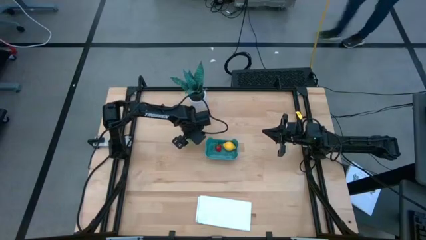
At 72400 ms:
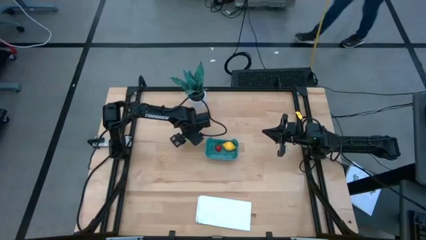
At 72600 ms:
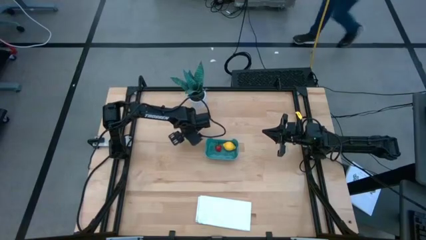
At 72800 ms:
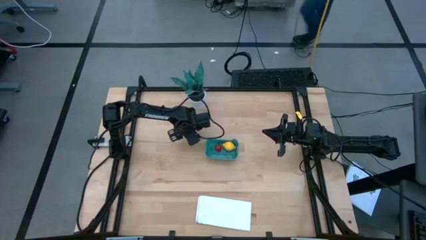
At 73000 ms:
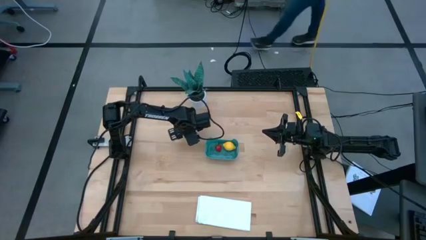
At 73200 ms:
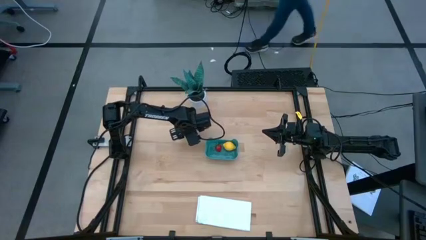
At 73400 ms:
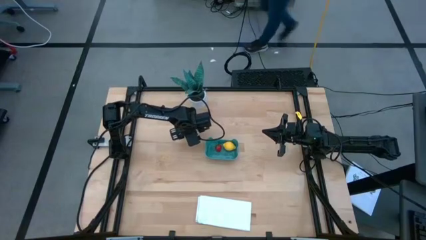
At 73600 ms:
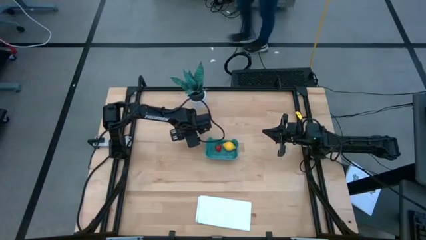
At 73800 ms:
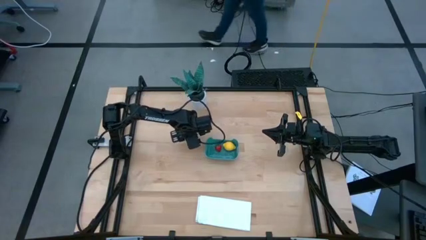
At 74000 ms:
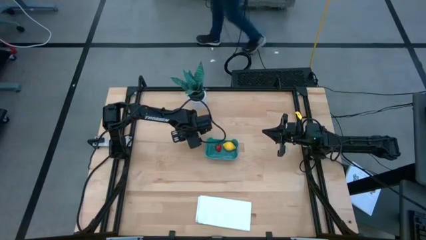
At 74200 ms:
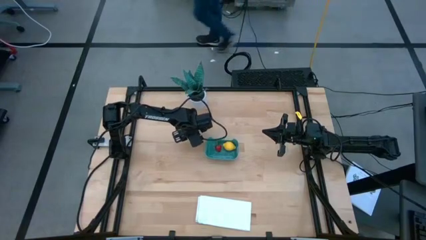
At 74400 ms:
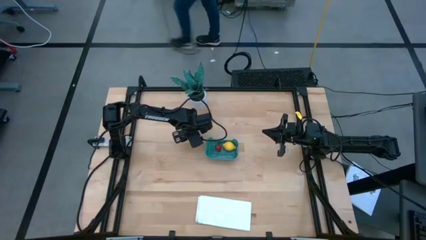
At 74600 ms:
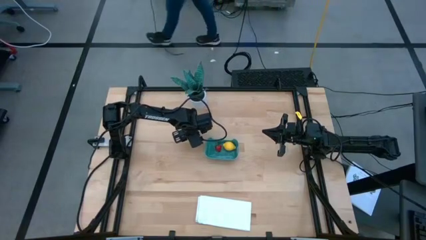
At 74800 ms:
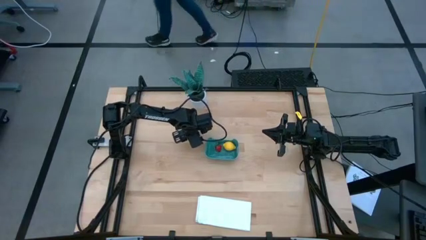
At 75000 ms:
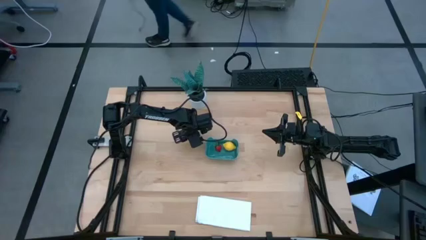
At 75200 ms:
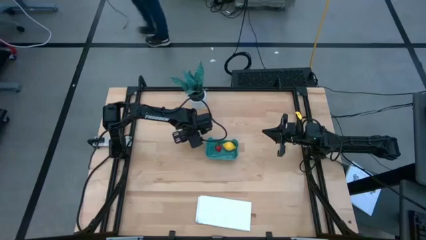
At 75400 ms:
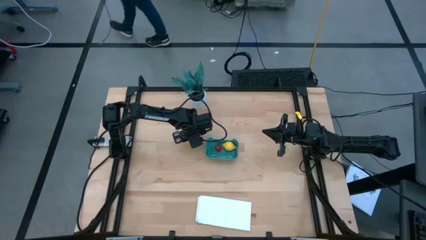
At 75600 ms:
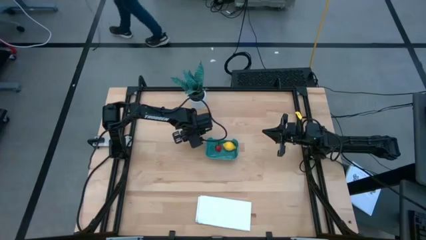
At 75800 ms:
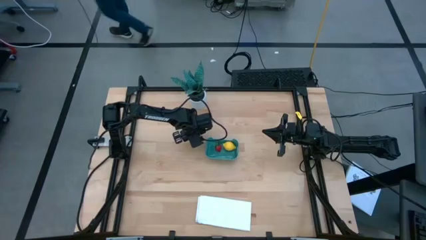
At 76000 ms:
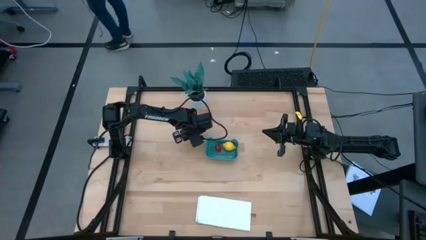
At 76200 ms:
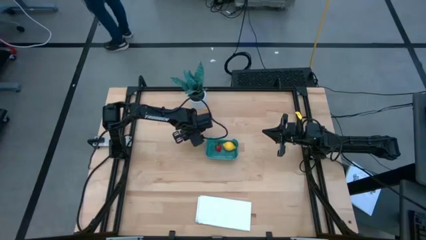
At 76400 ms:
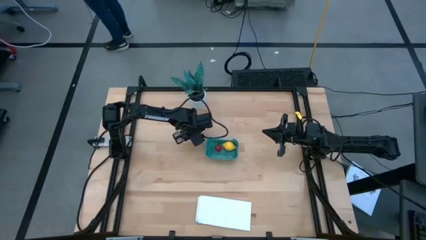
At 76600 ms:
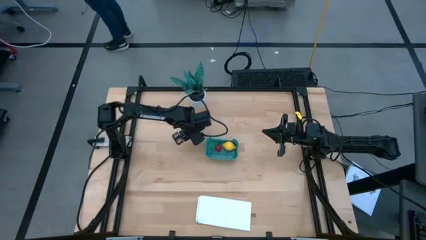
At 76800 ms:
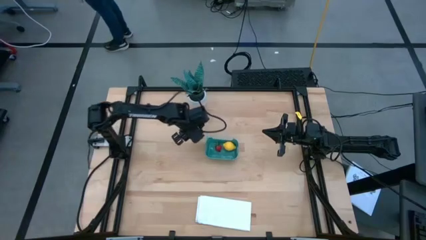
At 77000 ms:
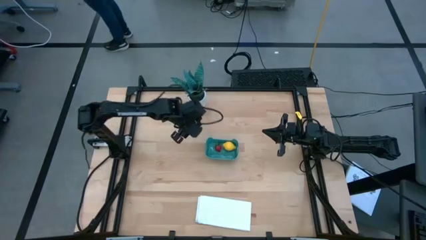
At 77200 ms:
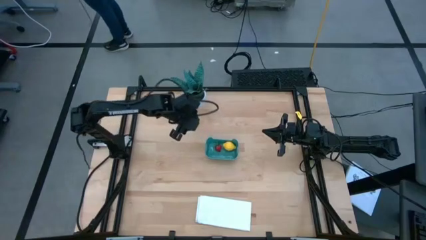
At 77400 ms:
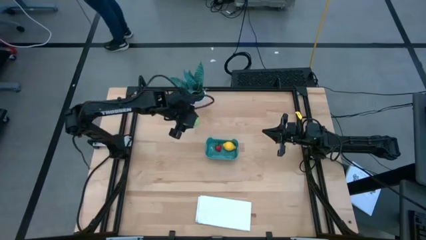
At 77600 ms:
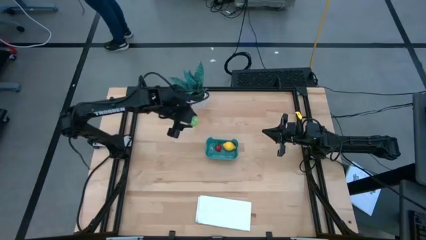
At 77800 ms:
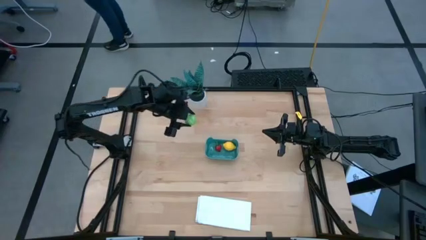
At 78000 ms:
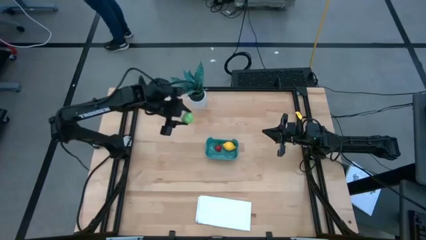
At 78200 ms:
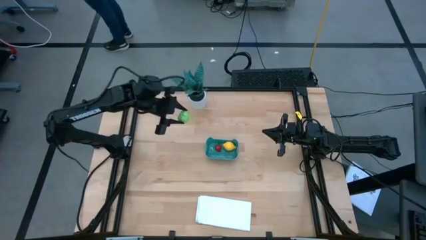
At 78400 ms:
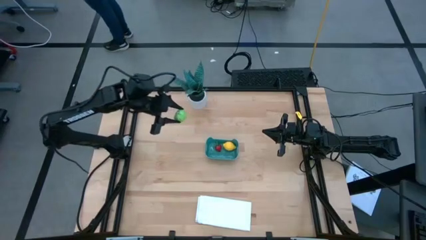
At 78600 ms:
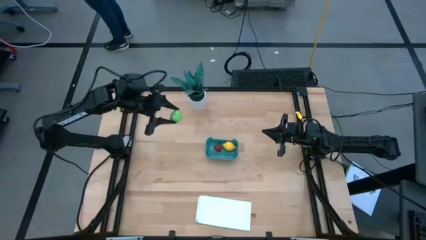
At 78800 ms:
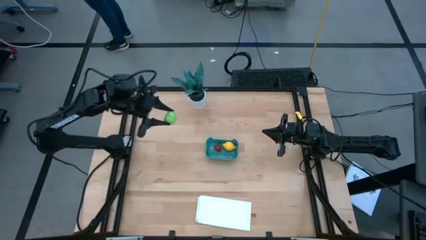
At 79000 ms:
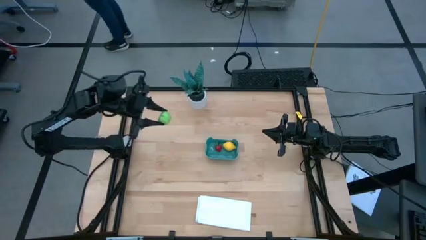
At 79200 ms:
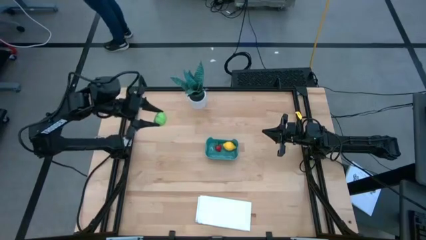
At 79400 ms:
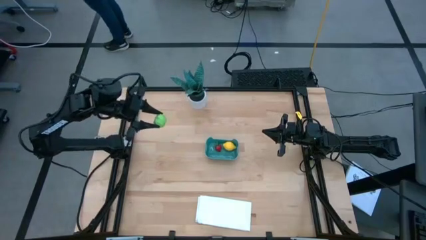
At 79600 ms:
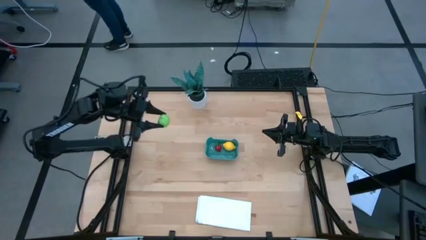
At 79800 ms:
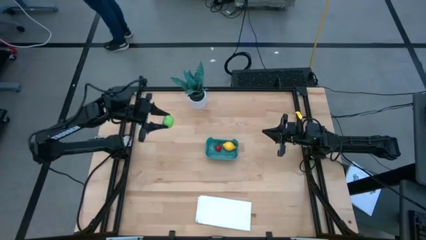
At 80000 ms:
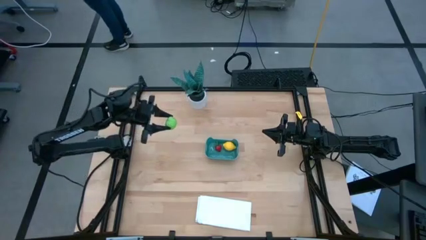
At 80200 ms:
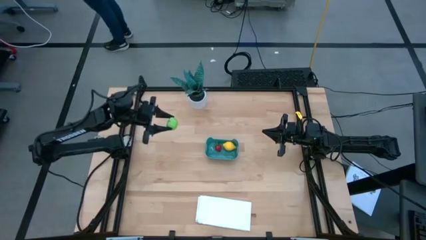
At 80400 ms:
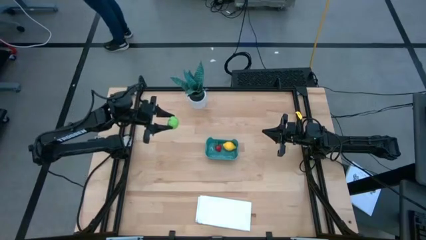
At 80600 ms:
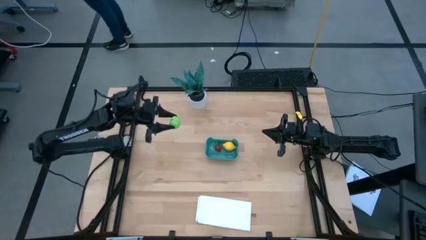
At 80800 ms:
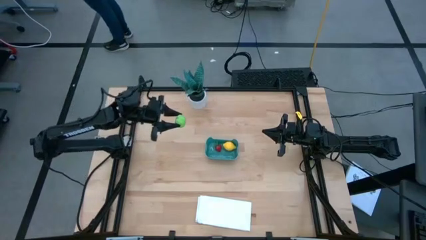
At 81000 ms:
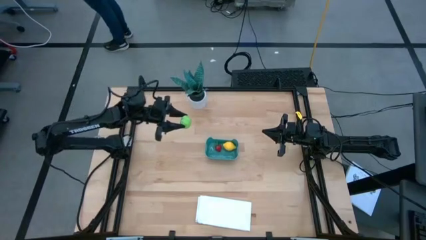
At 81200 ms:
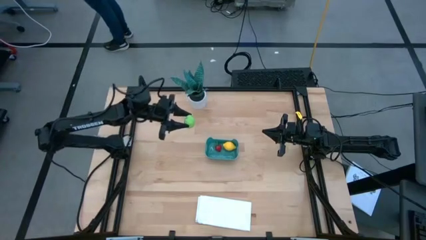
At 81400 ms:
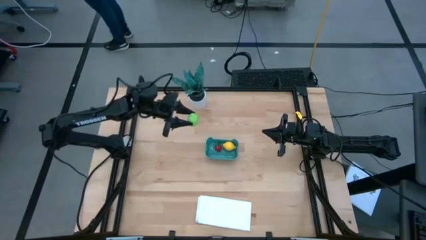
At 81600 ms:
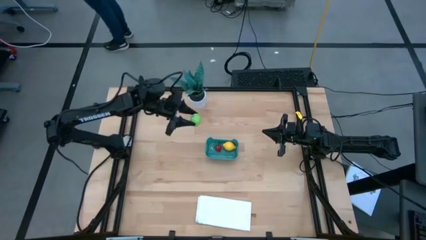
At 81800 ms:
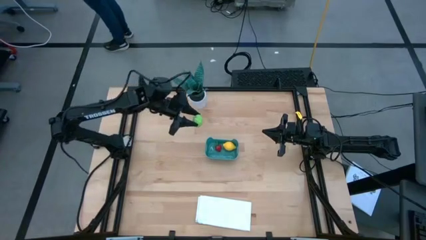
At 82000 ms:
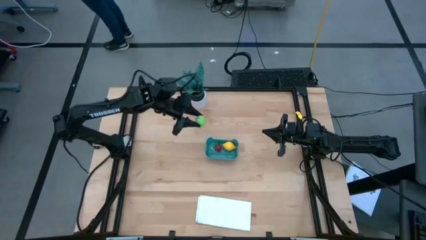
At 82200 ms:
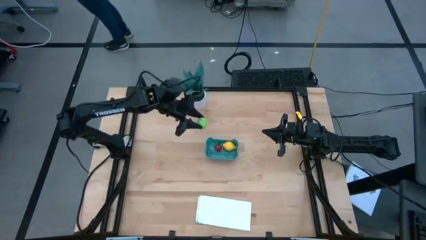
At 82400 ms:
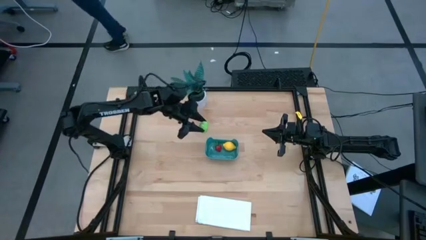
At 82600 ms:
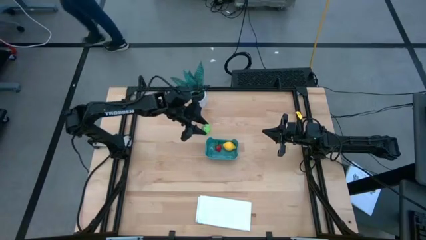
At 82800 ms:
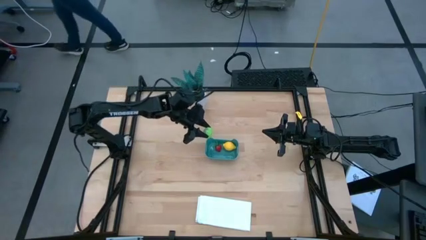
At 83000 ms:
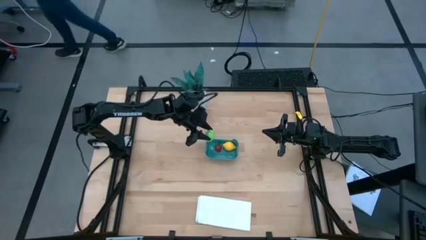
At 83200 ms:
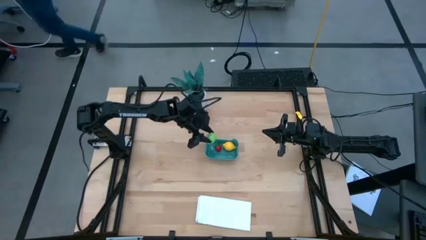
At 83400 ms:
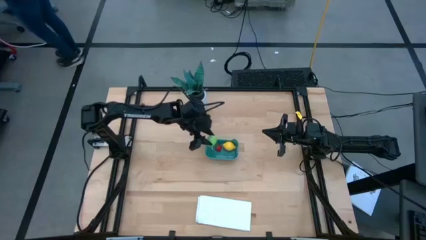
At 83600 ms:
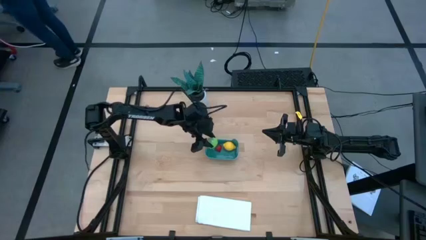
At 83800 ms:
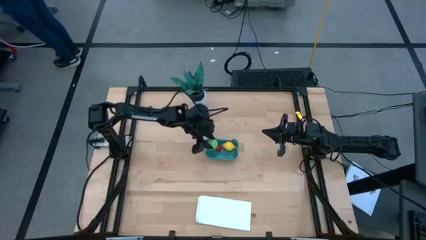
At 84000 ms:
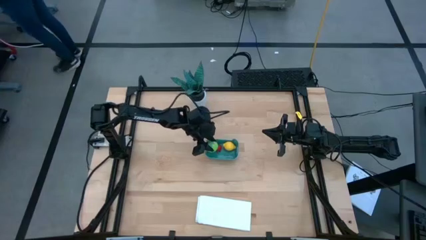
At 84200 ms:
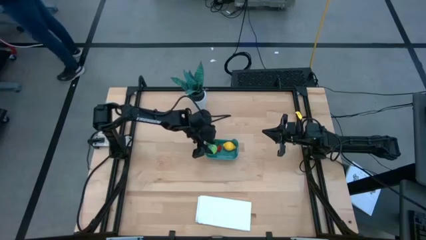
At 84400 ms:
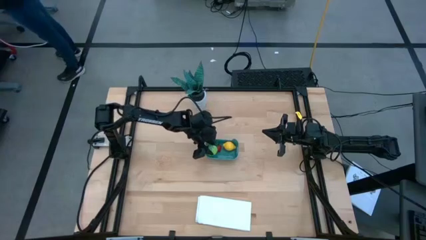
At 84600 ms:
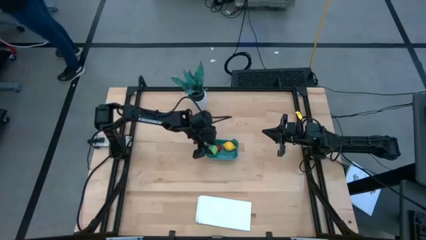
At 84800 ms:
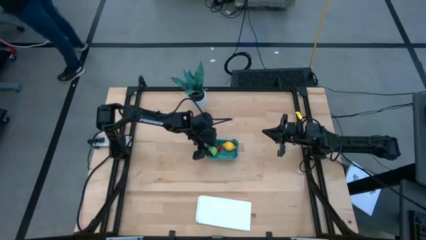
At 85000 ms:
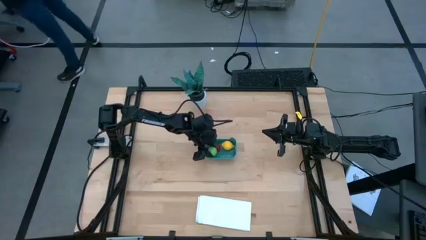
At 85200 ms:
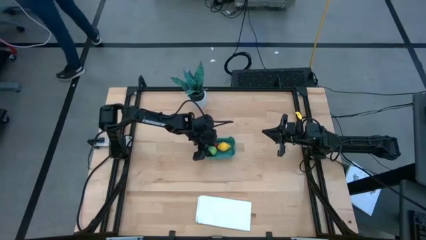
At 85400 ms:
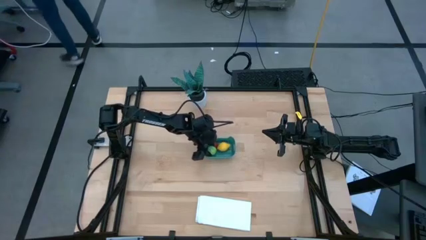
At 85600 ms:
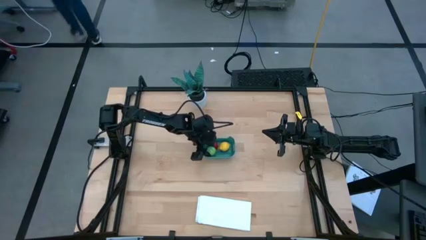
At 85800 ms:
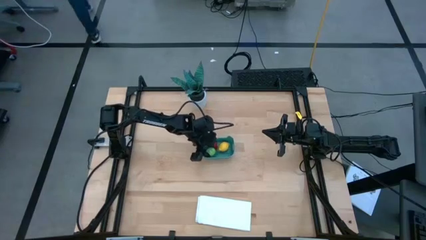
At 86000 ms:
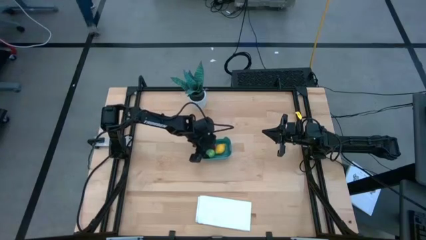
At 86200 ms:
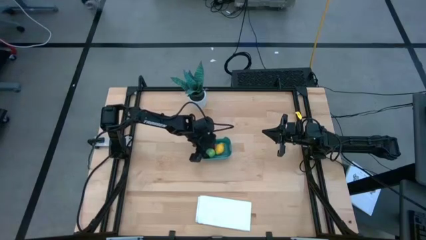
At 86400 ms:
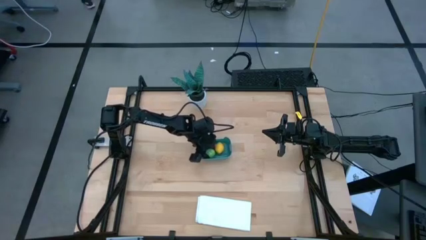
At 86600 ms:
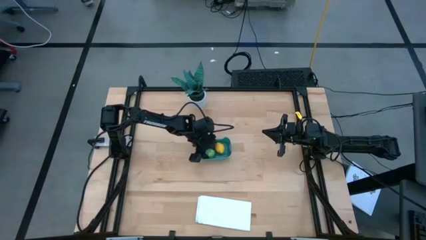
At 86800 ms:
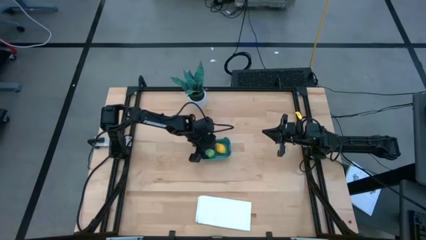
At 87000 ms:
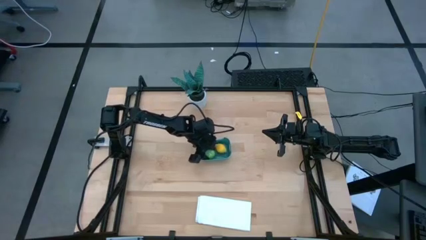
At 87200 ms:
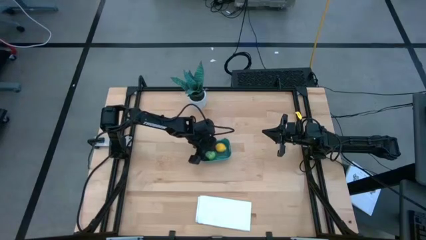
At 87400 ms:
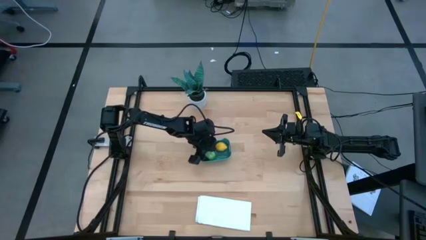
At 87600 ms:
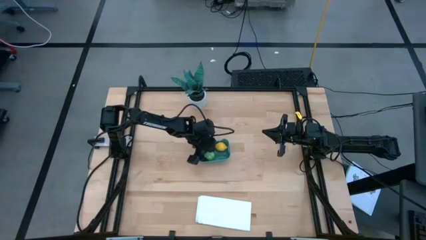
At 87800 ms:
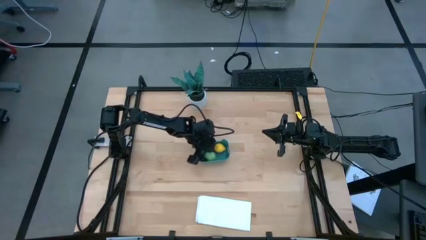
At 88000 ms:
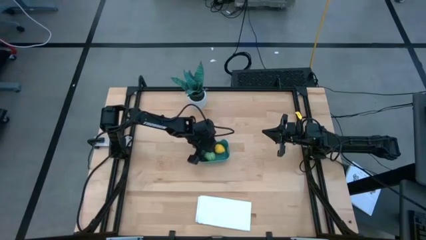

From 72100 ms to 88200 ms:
Task: Pick and placing Produce into tupperware
Put the green cabbage into the blue container
